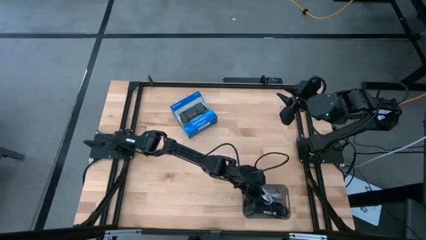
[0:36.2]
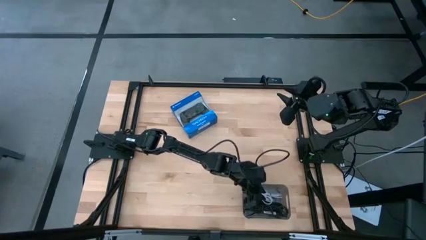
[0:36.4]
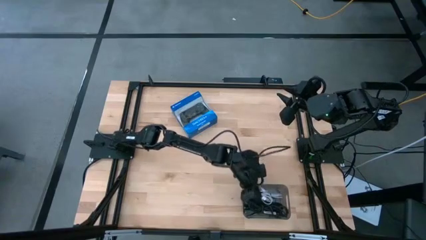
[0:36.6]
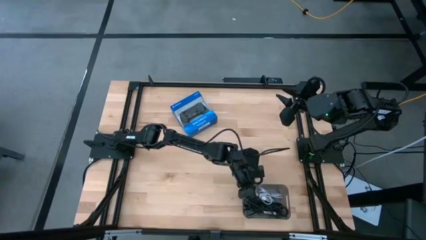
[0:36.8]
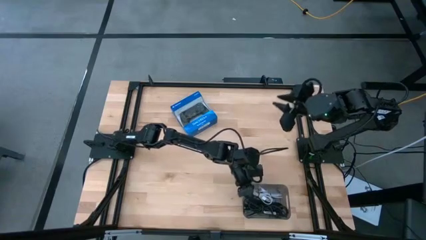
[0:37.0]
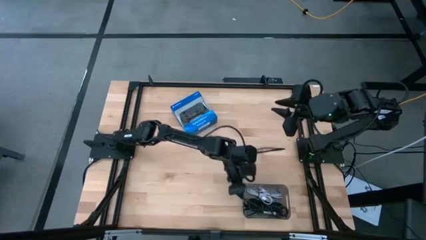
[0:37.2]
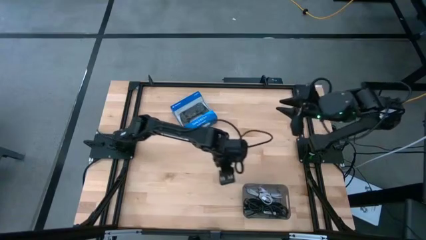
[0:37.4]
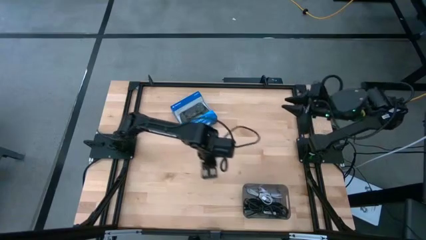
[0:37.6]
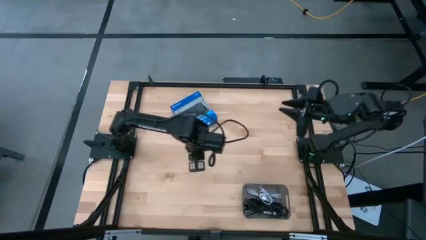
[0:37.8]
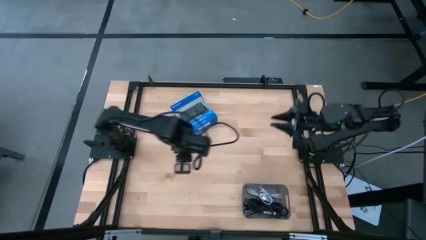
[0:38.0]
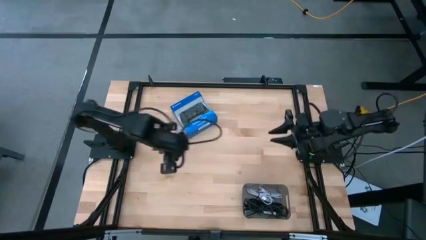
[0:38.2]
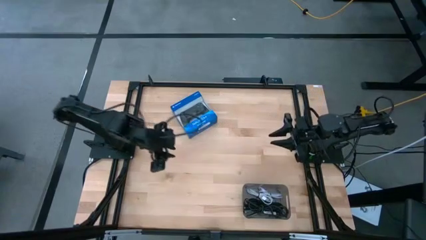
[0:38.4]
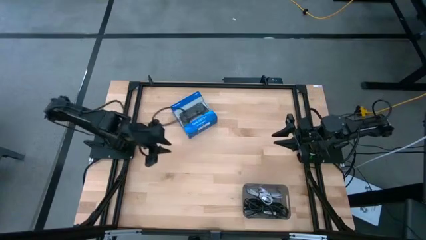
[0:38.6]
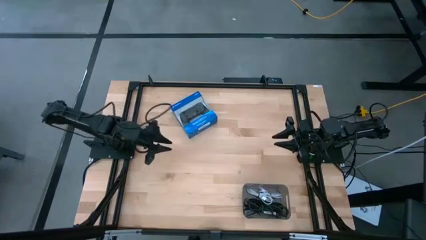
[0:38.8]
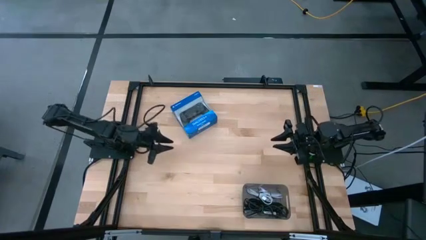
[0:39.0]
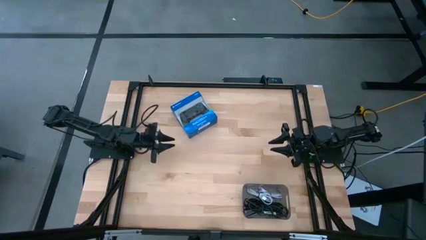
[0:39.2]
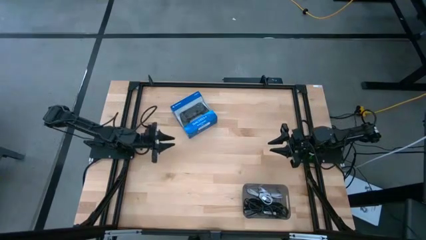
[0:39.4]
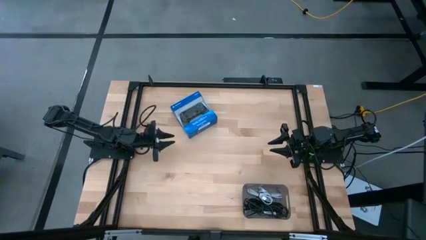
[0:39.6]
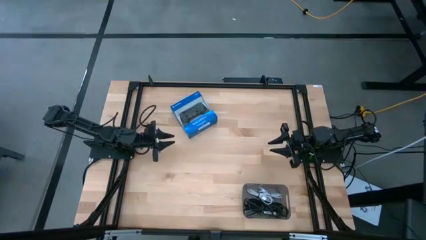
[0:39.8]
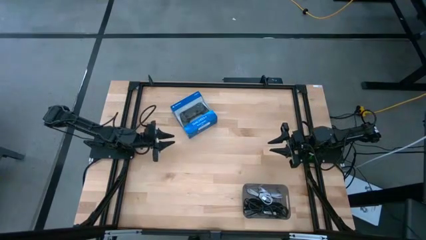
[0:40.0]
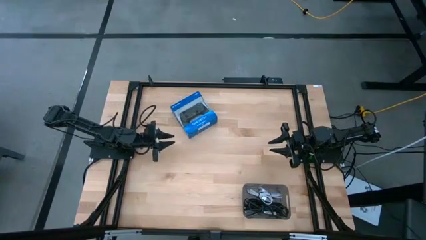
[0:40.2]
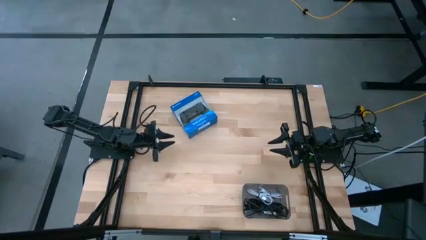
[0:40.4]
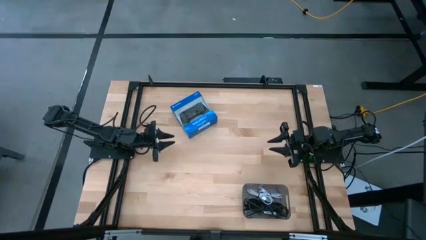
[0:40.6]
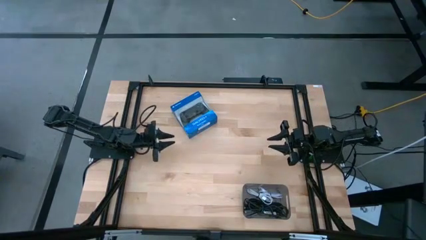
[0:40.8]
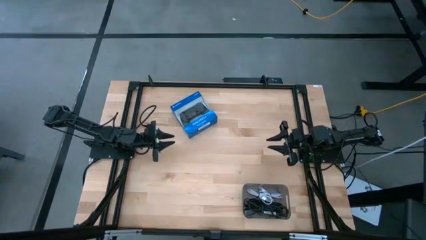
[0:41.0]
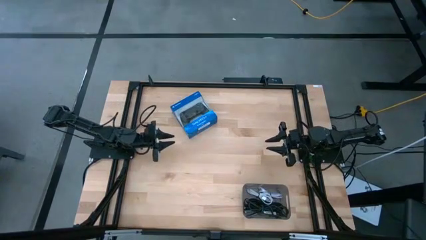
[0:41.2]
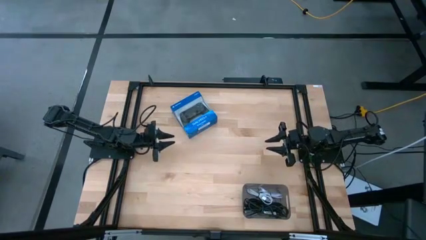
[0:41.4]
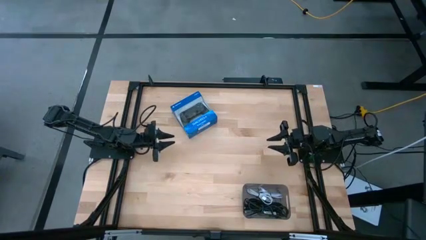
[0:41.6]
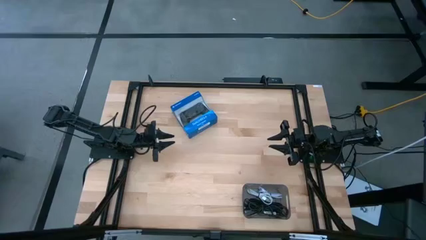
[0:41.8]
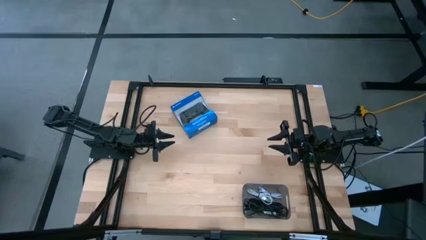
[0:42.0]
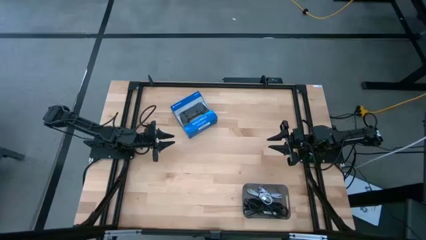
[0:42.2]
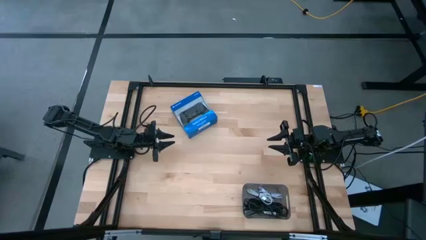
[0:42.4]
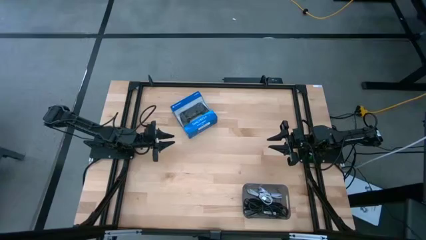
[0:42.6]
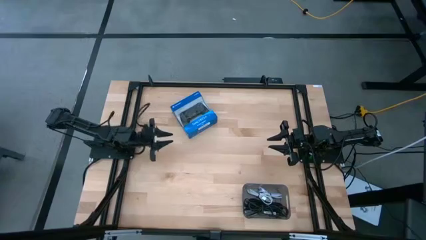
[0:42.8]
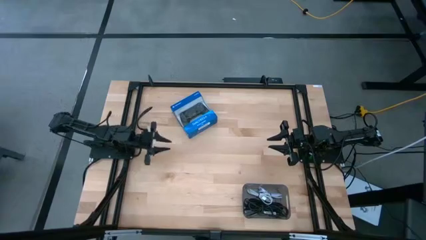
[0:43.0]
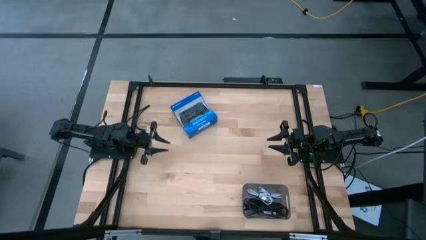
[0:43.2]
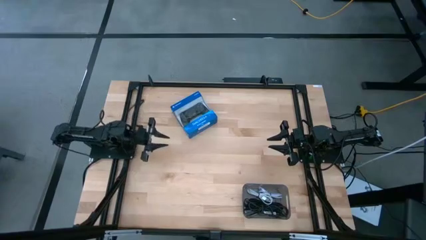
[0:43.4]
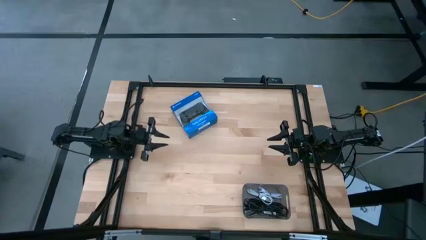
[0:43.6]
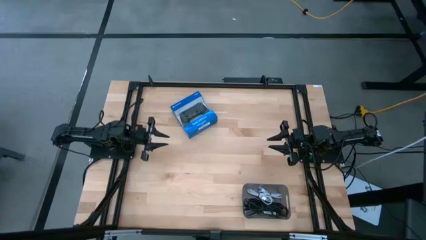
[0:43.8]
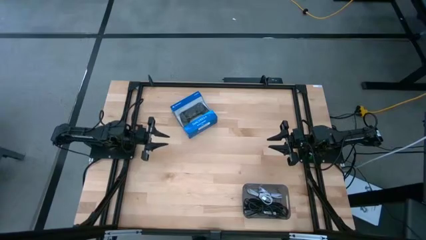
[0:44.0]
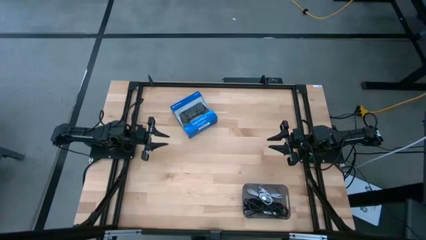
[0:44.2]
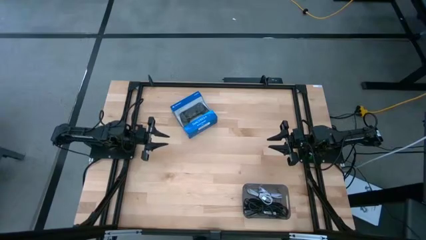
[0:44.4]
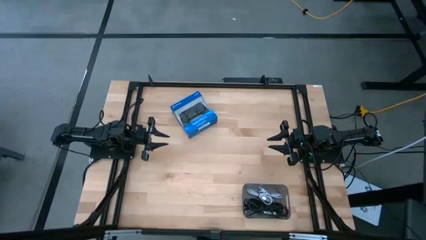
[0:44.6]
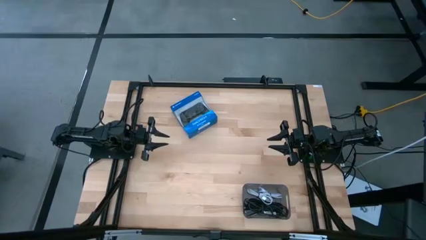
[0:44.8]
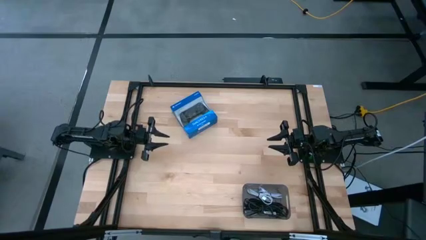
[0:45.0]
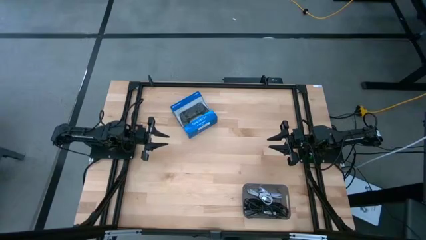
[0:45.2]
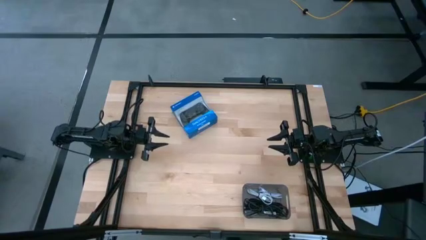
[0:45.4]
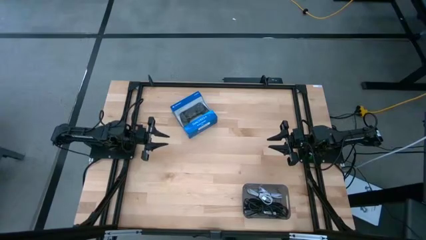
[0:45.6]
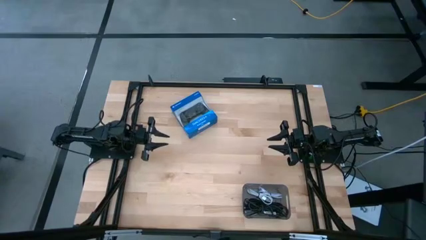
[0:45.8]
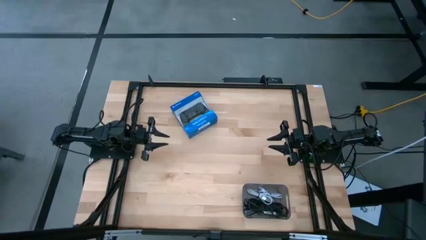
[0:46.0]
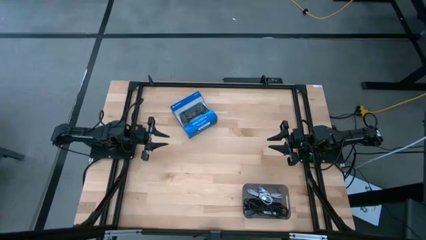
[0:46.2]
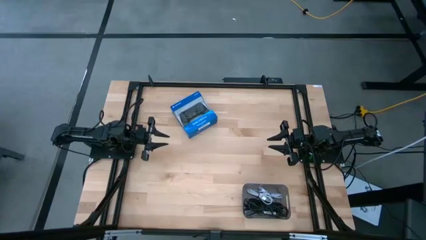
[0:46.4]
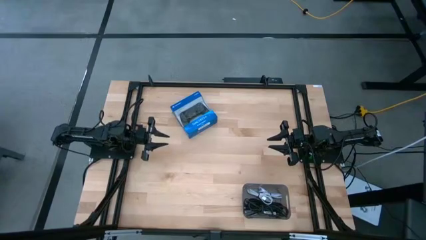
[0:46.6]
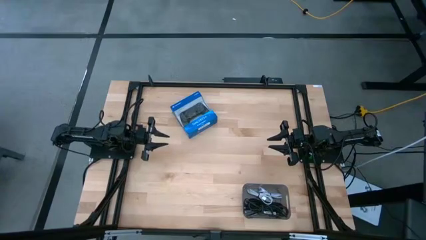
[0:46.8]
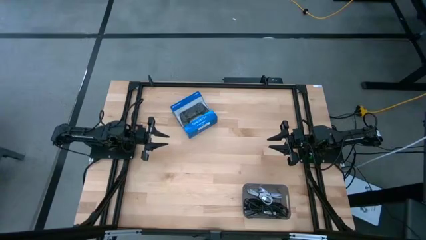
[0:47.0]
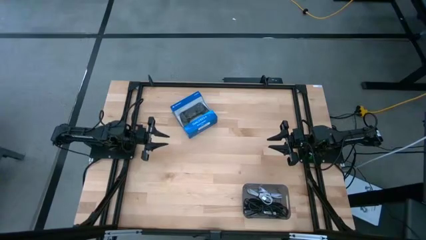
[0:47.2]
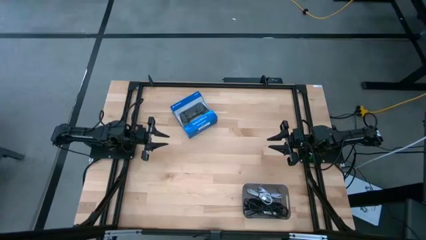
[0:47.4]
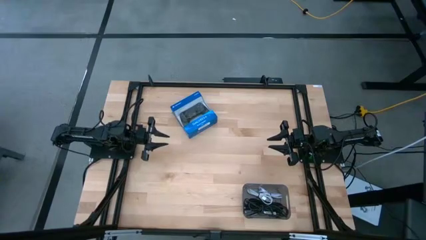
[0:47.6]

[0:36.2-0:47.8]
Task: Pick and place USB-C Cables
Return to Home Position
